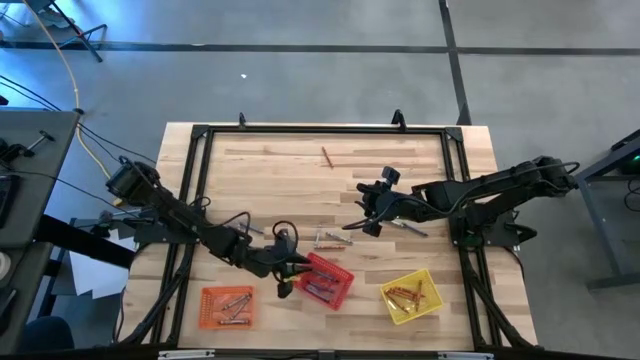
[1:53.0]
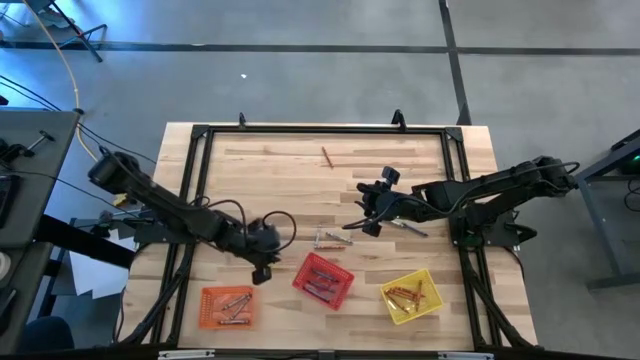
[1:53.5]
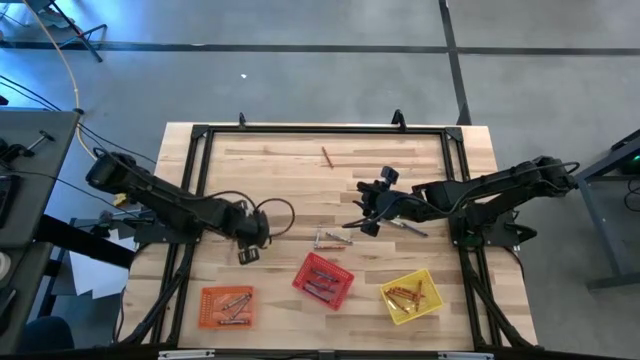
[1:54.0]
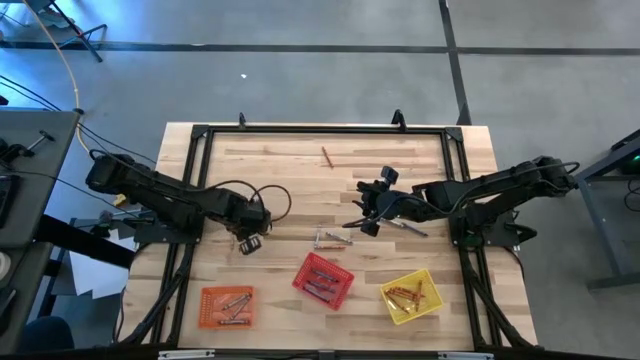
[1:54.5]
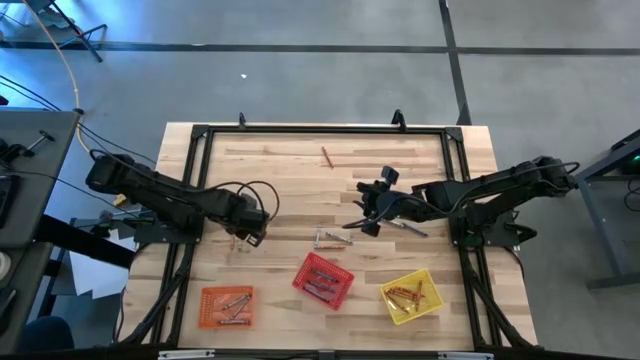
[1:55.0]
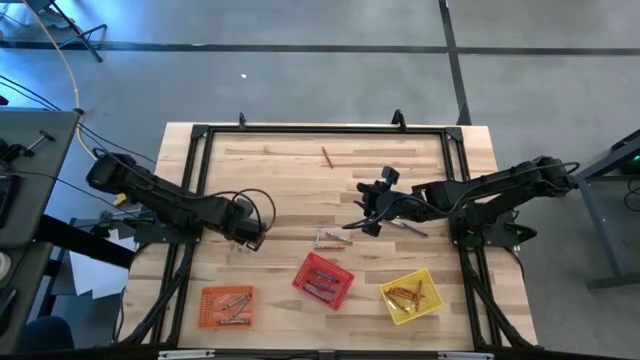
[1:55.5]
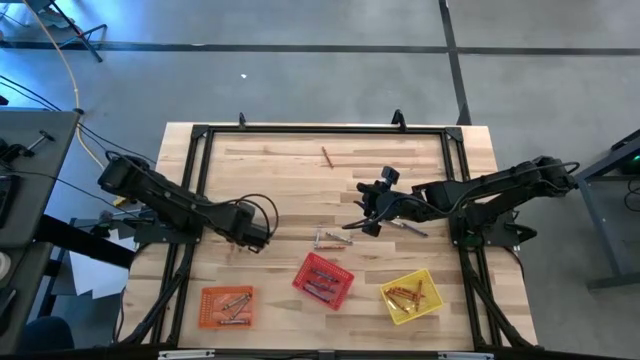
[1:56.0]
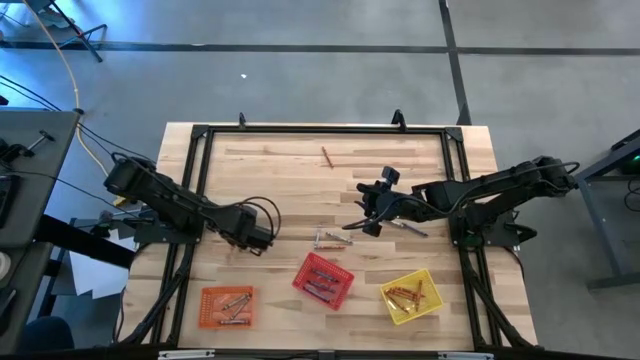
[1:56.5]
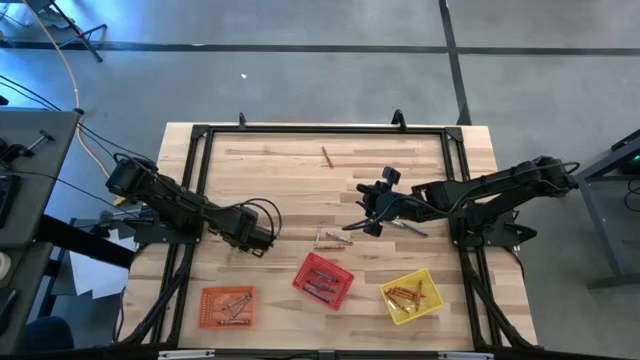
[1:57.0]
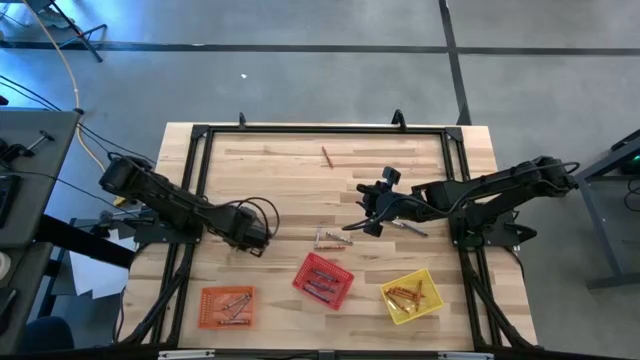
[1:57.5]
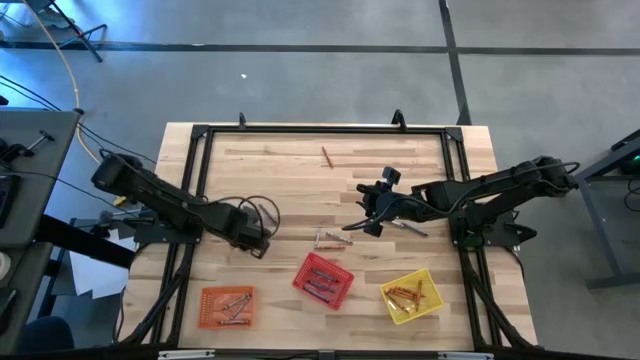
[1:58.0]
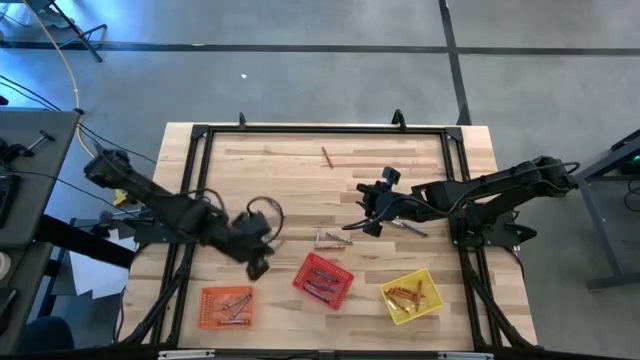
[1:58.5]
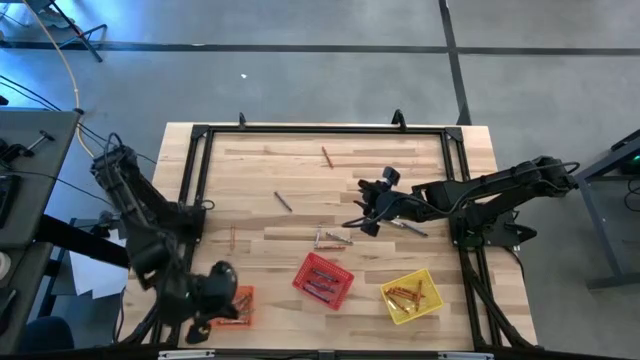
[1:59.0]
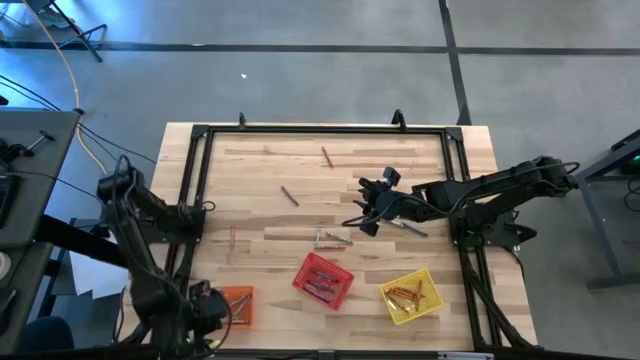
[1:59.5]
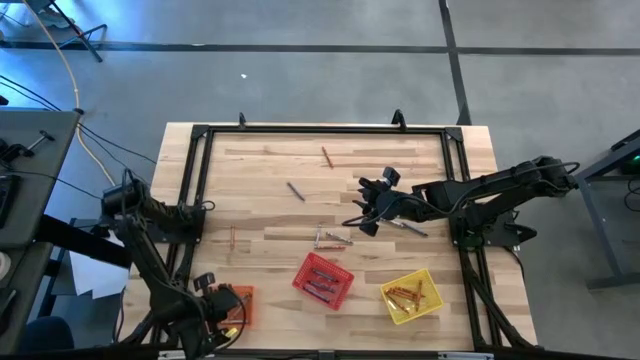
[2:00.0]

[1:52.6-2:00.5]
Task: Sort crayons
Put the gray crayon into the orange bin

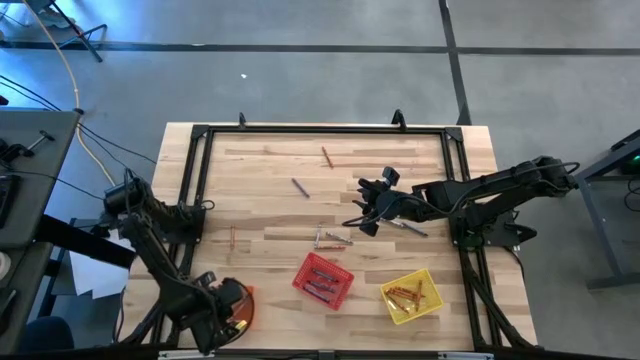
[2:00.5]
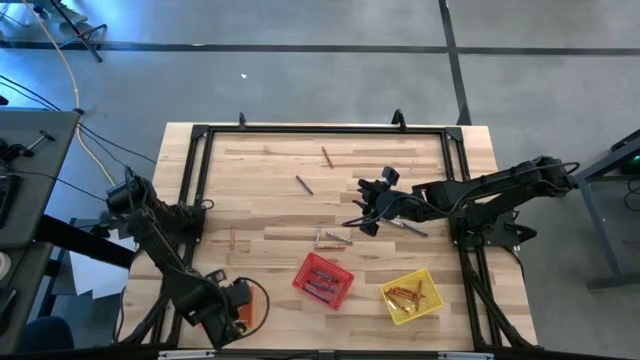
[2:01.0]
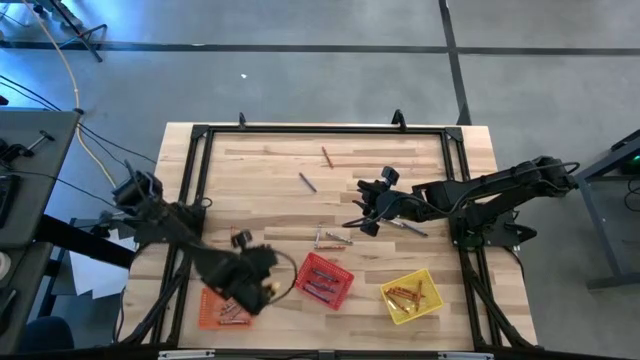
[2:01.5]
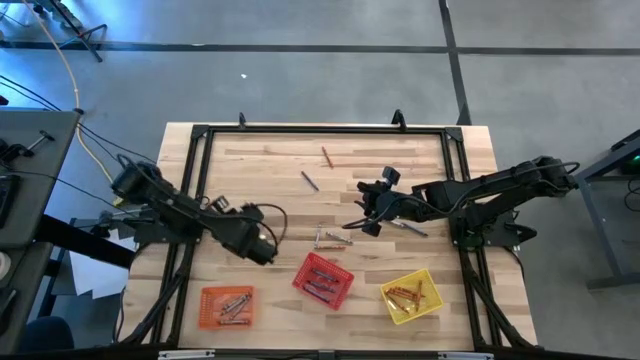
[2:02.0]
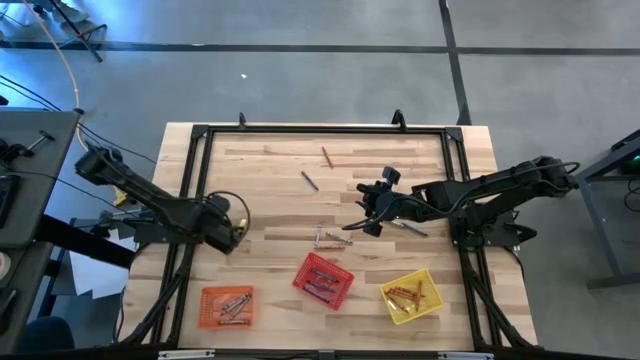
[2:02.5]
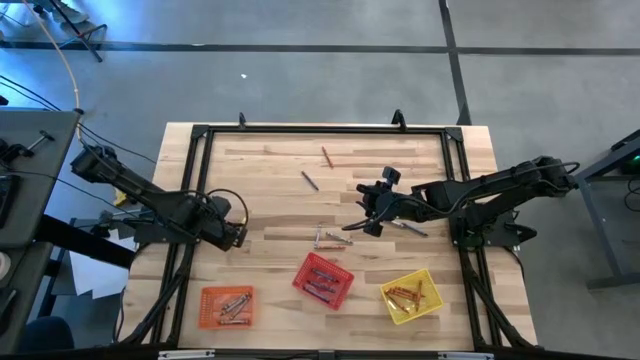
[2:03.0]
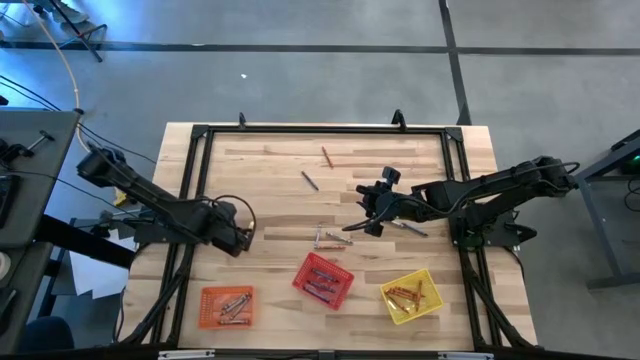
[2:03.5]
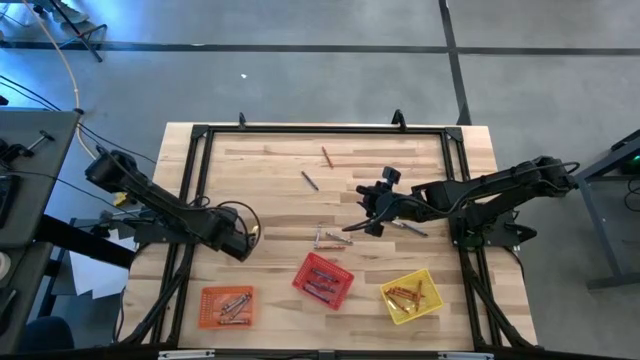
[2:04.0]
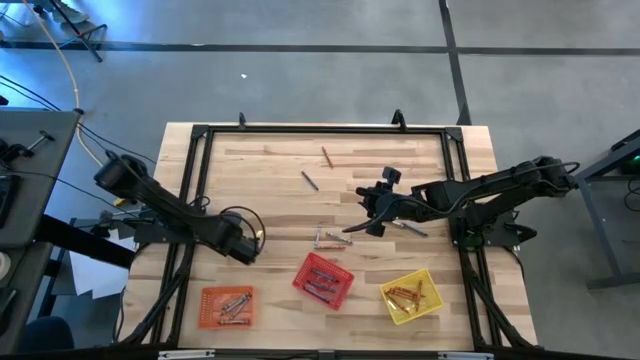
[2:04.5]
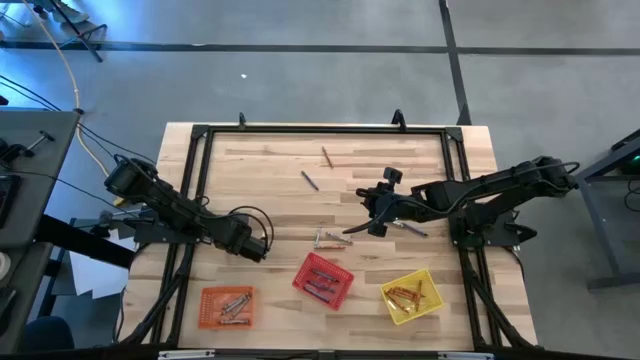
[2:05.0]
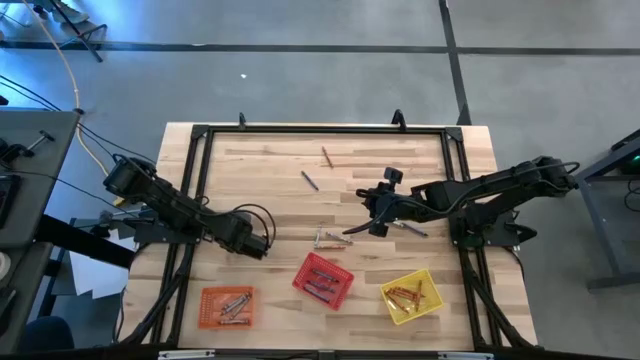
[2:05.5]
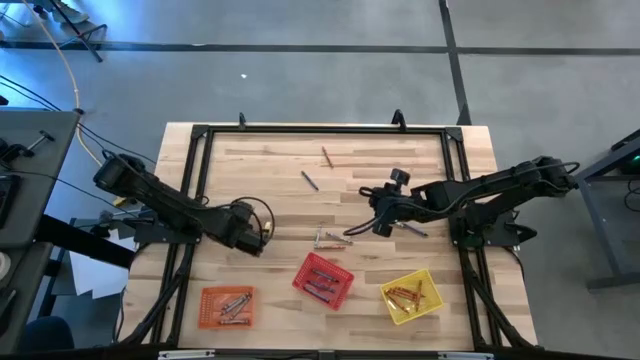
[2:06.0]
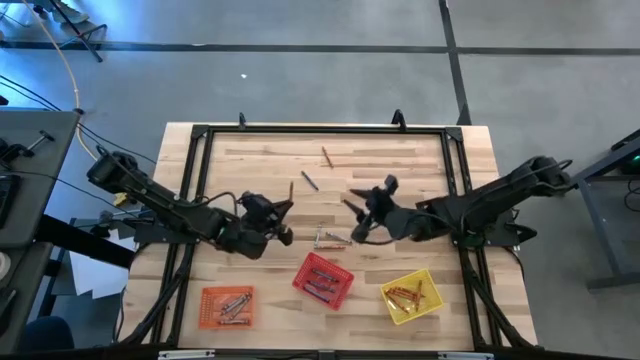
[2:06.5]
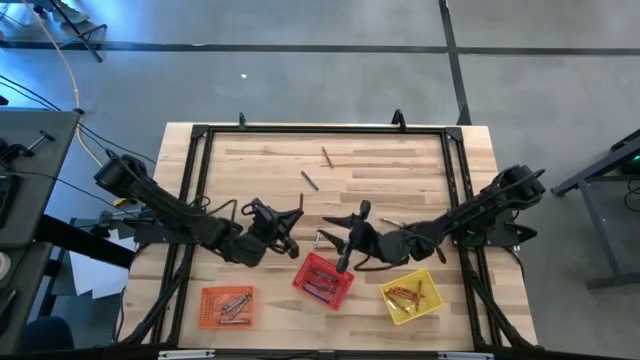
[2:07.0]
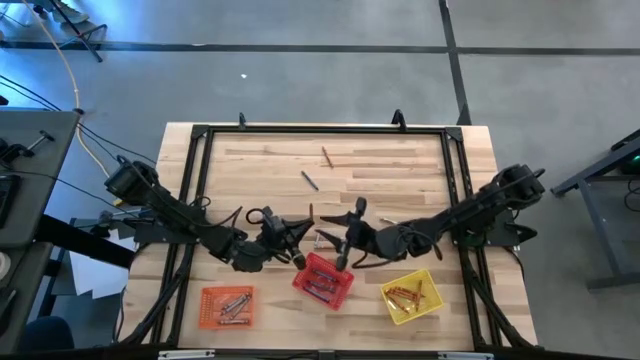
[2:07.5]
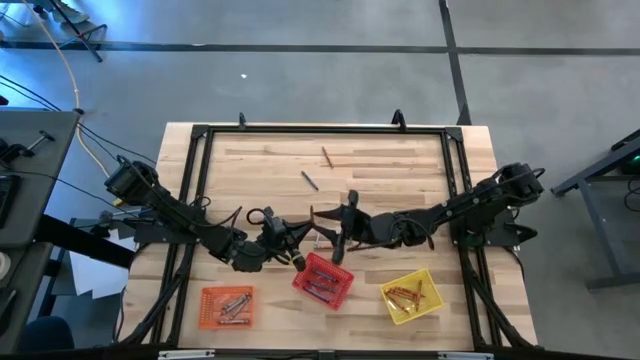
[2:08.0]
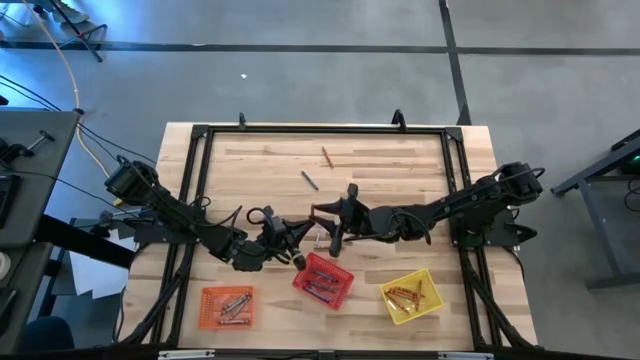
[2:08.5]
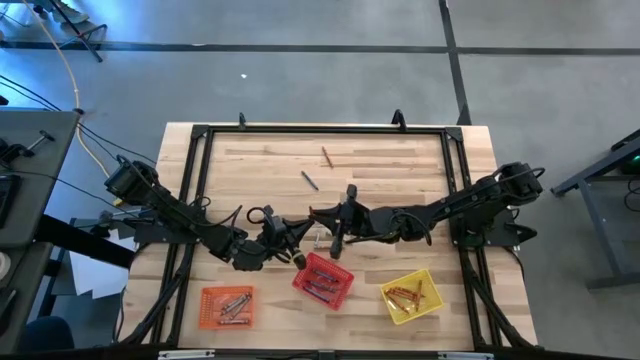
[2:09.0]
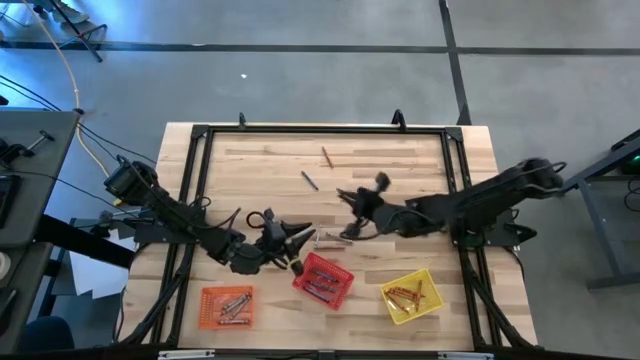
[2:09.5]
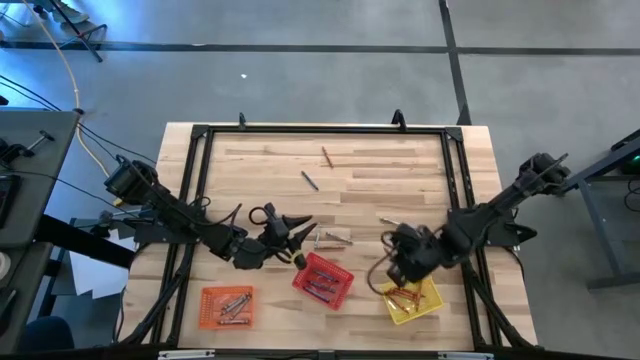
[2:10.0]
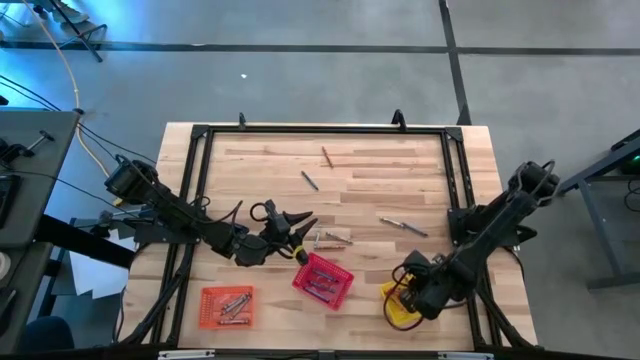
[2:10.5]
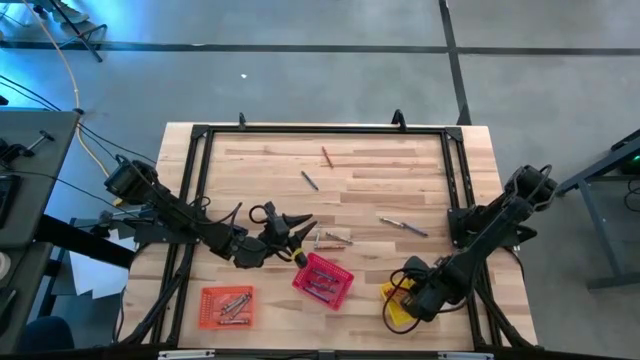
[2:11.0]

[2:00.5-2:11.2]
Put the orange crayon into the yellow bin
